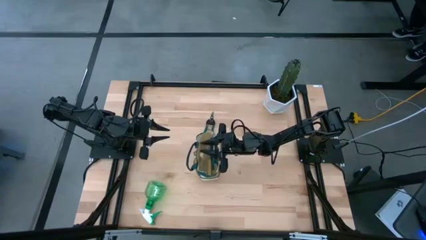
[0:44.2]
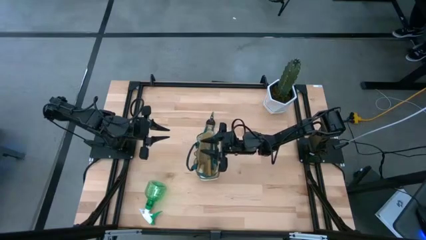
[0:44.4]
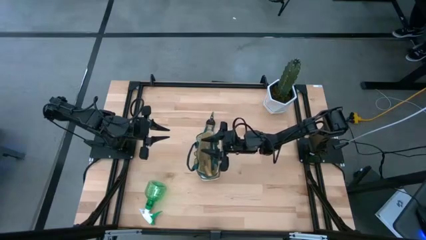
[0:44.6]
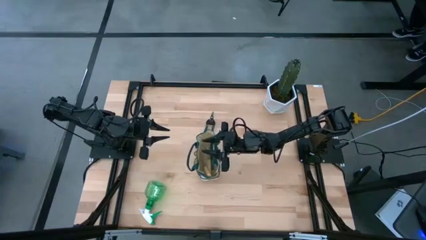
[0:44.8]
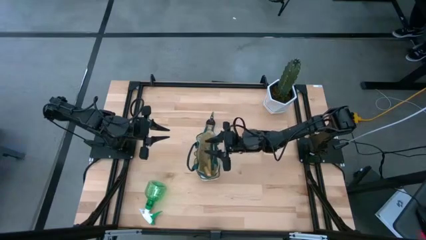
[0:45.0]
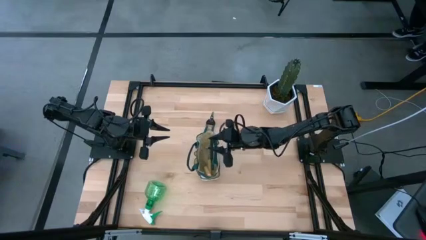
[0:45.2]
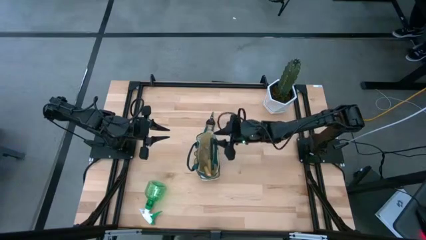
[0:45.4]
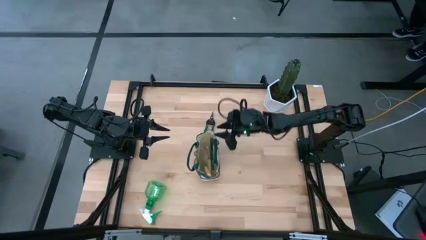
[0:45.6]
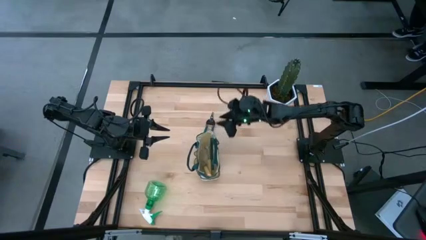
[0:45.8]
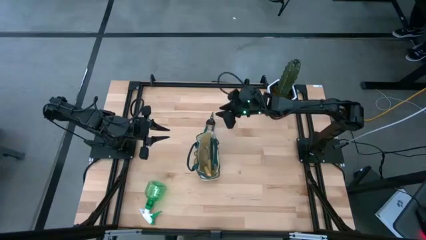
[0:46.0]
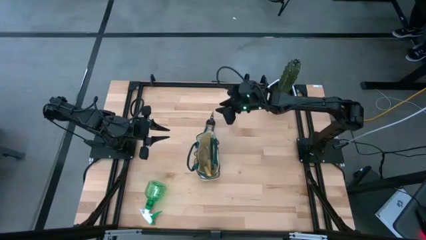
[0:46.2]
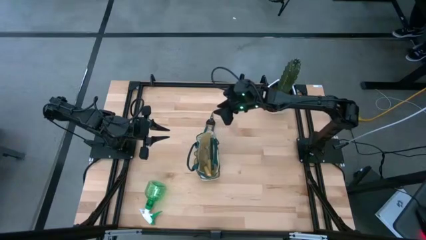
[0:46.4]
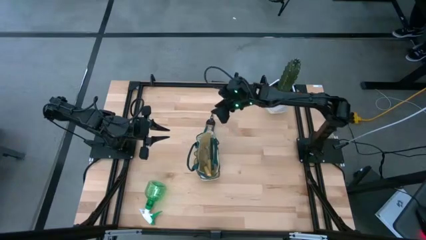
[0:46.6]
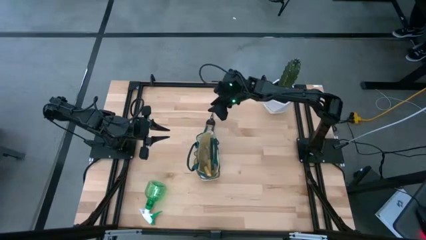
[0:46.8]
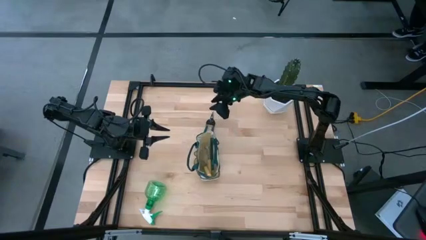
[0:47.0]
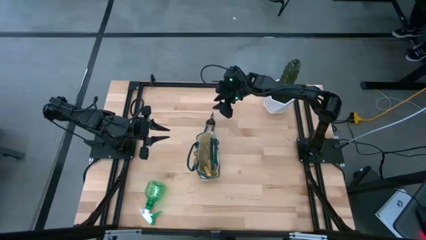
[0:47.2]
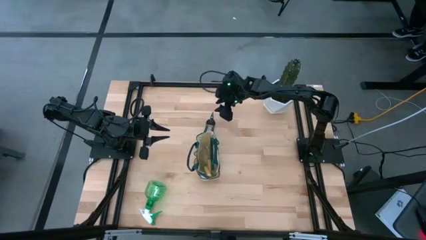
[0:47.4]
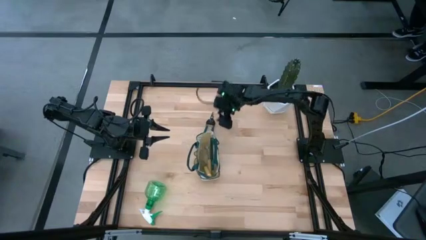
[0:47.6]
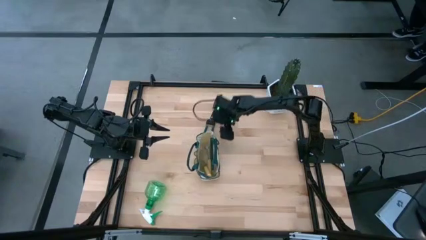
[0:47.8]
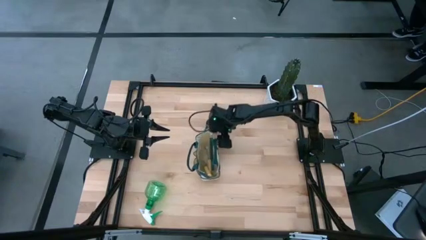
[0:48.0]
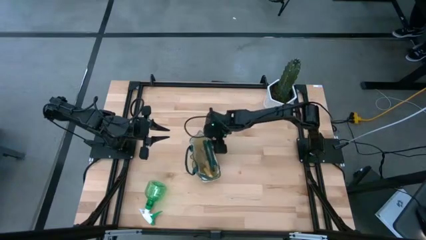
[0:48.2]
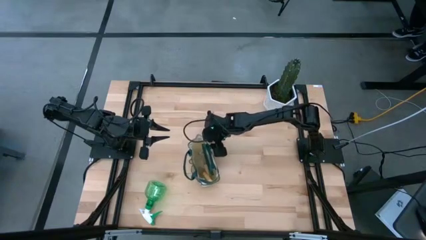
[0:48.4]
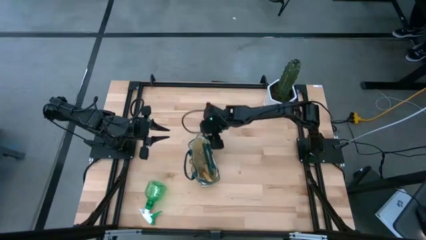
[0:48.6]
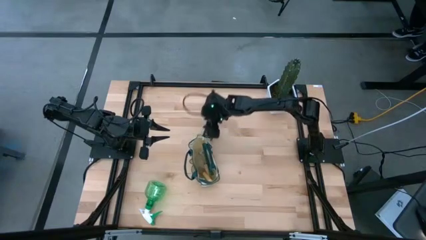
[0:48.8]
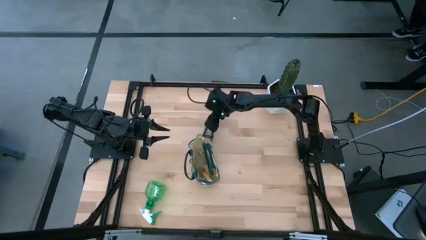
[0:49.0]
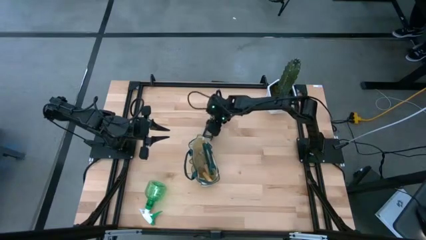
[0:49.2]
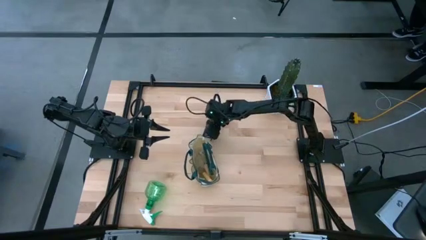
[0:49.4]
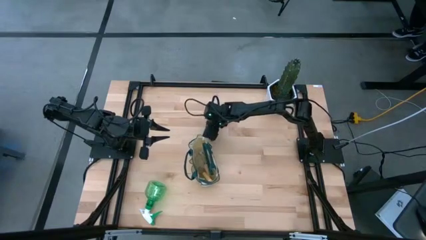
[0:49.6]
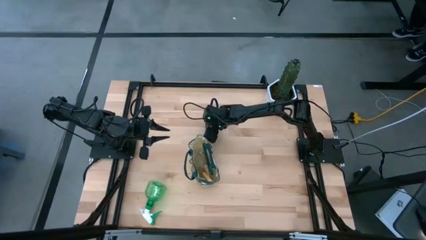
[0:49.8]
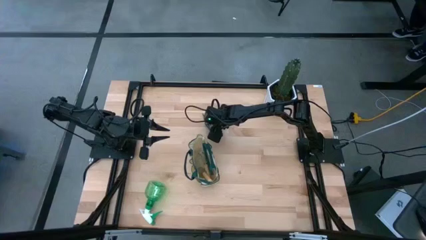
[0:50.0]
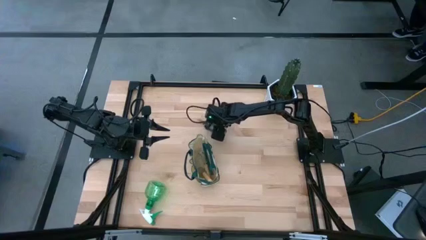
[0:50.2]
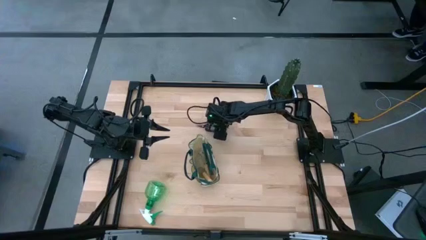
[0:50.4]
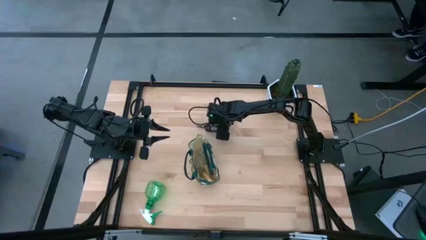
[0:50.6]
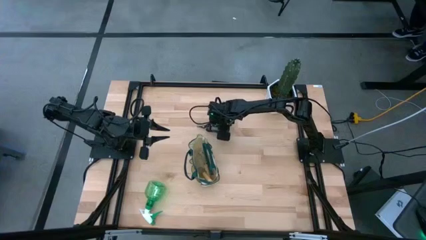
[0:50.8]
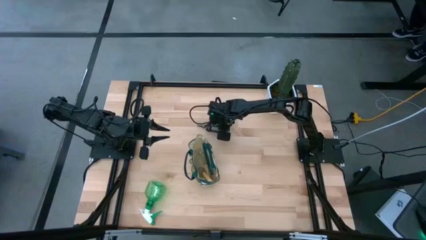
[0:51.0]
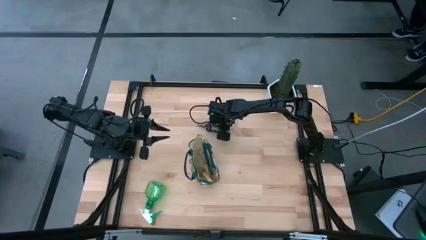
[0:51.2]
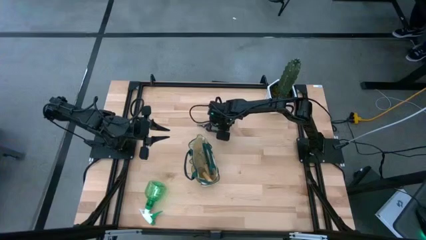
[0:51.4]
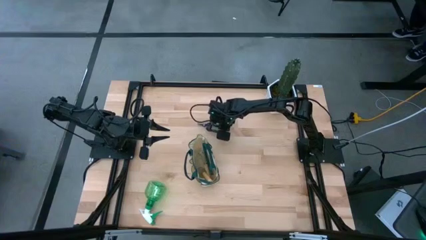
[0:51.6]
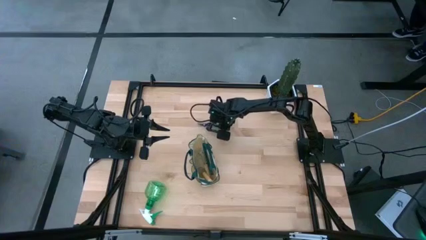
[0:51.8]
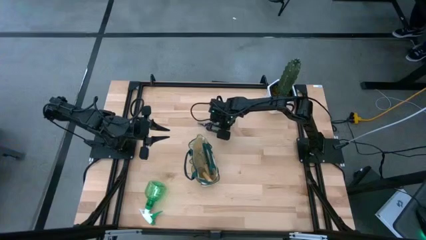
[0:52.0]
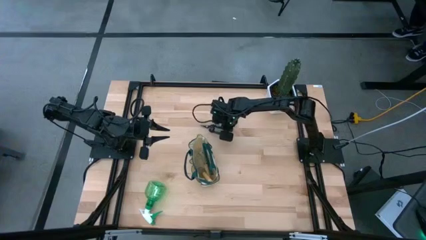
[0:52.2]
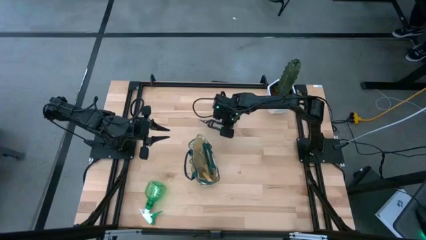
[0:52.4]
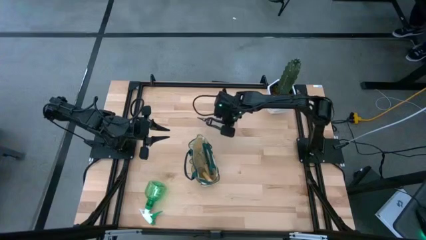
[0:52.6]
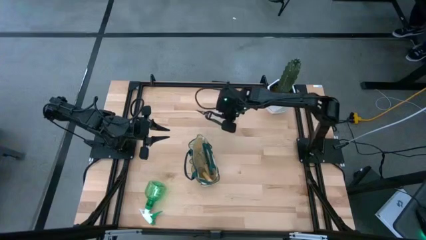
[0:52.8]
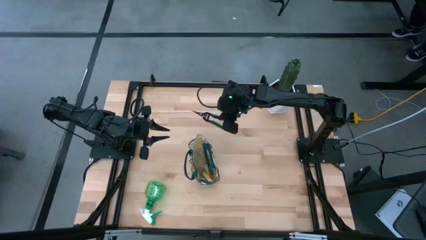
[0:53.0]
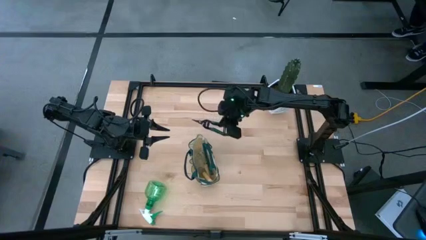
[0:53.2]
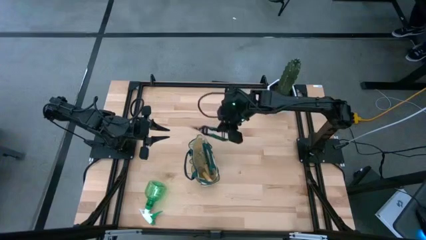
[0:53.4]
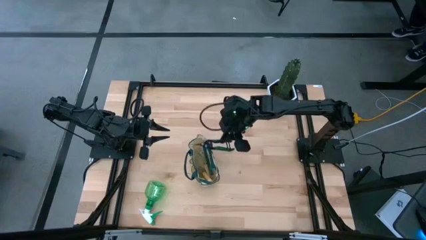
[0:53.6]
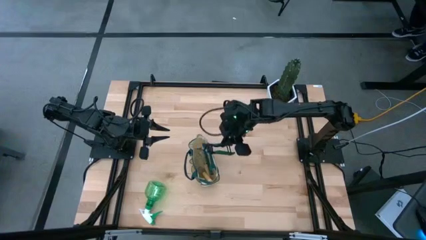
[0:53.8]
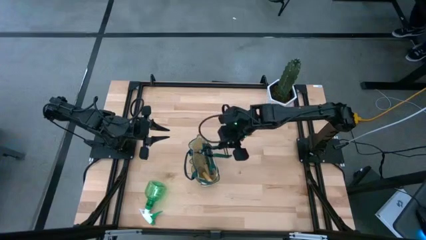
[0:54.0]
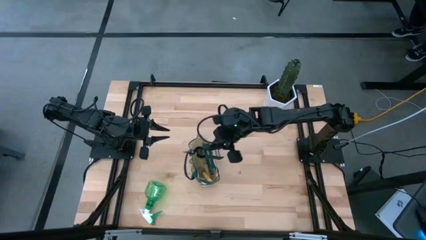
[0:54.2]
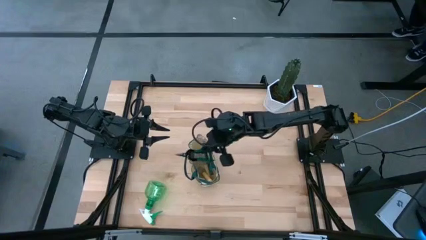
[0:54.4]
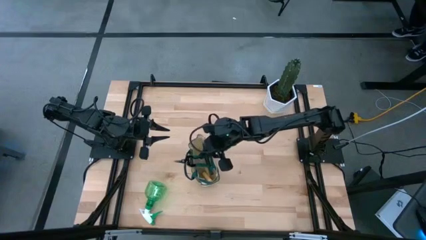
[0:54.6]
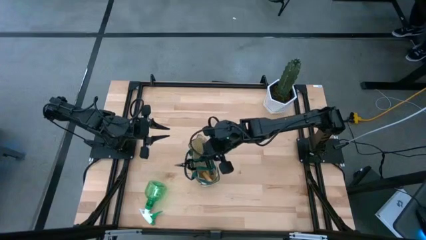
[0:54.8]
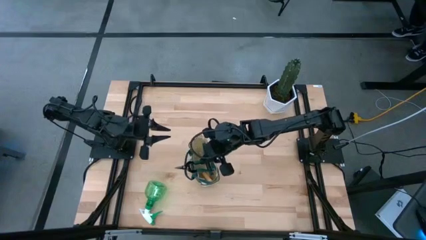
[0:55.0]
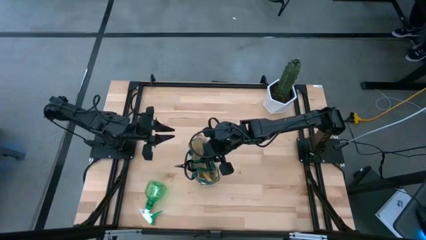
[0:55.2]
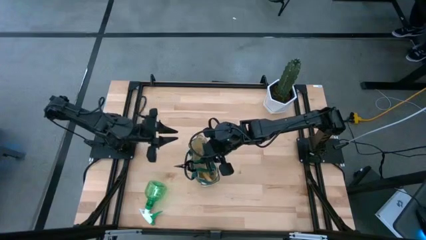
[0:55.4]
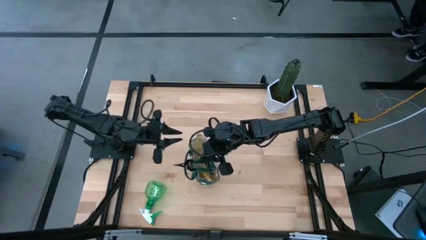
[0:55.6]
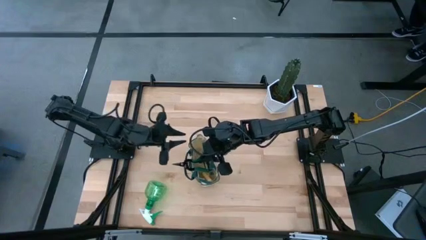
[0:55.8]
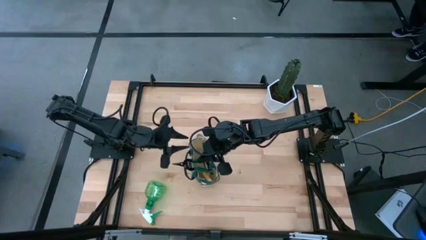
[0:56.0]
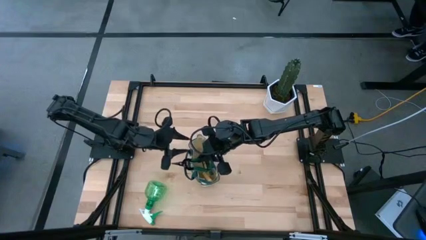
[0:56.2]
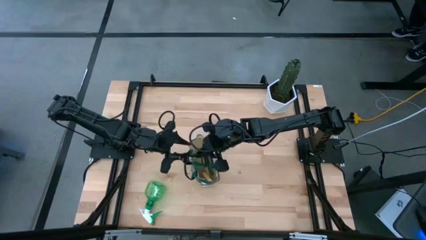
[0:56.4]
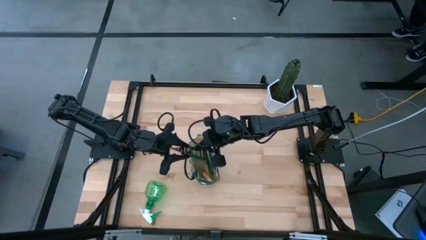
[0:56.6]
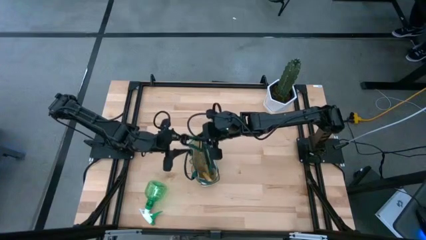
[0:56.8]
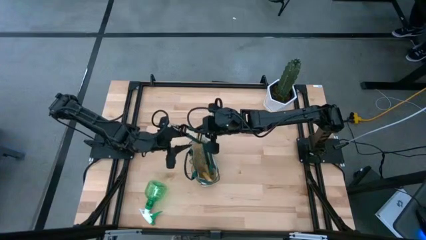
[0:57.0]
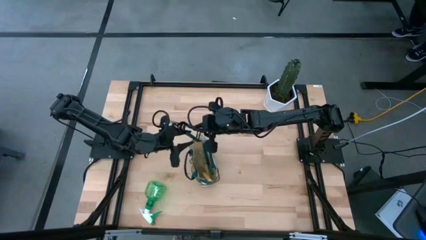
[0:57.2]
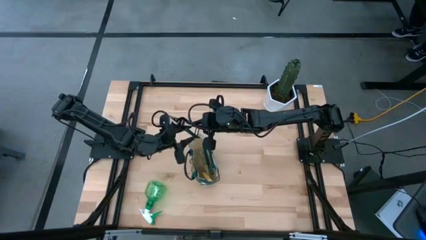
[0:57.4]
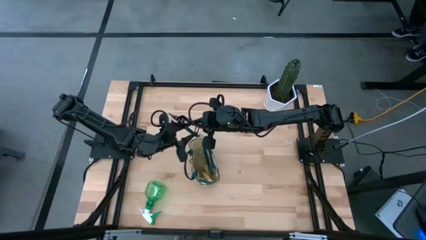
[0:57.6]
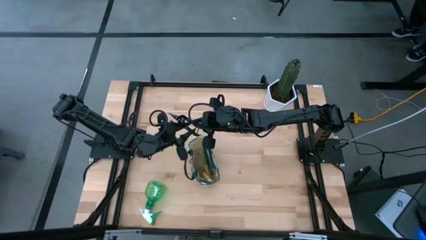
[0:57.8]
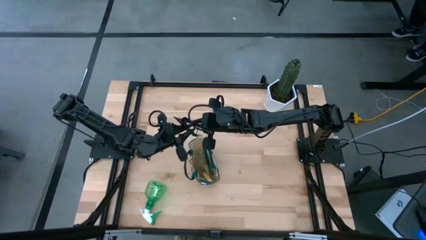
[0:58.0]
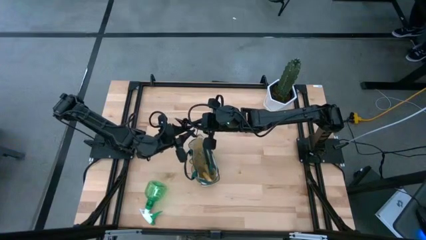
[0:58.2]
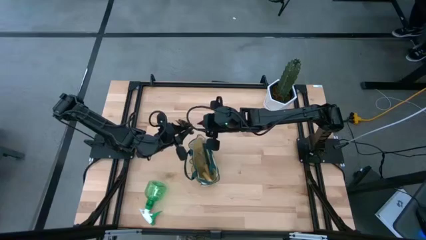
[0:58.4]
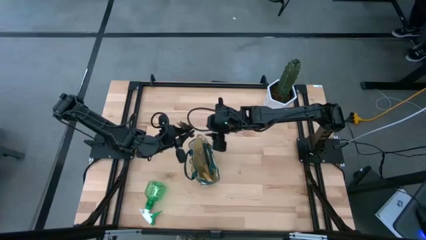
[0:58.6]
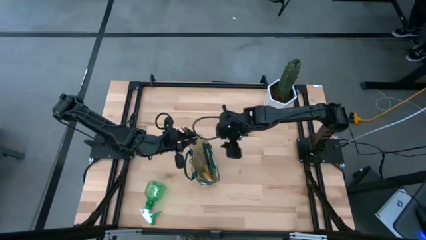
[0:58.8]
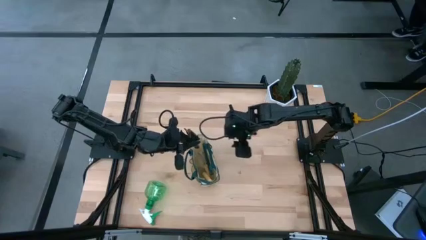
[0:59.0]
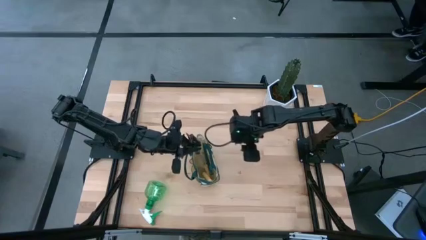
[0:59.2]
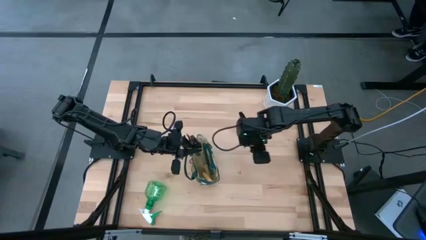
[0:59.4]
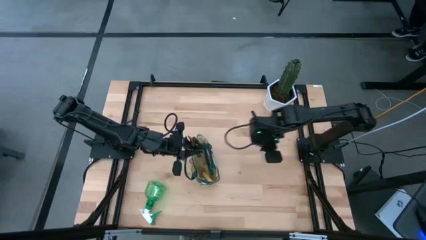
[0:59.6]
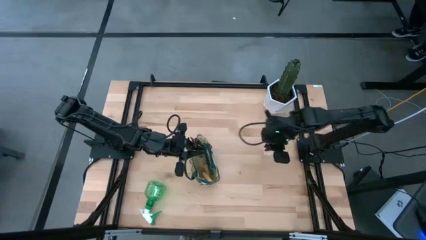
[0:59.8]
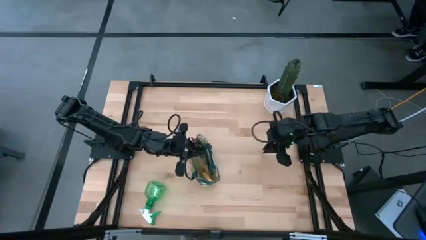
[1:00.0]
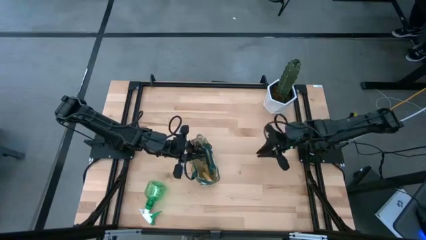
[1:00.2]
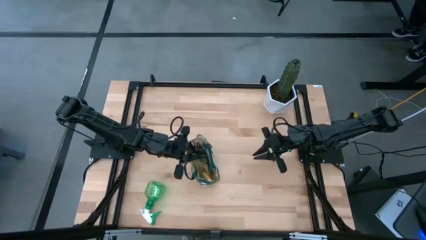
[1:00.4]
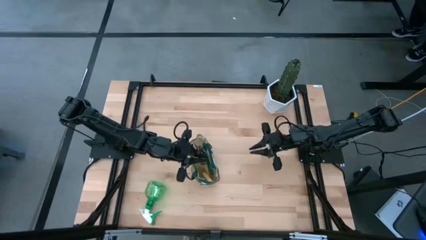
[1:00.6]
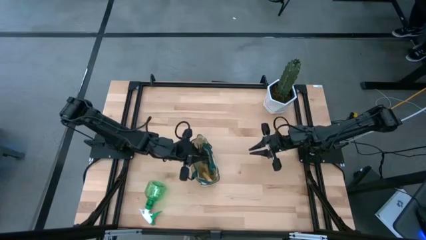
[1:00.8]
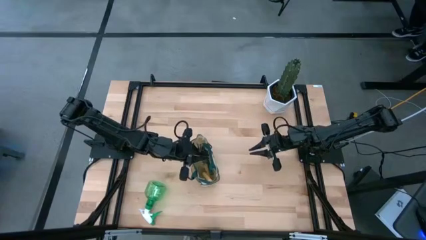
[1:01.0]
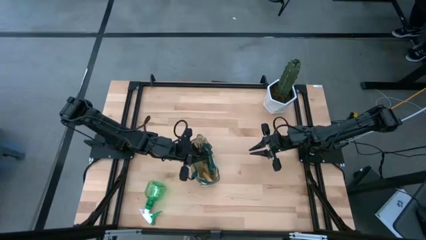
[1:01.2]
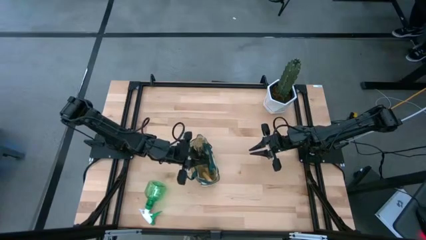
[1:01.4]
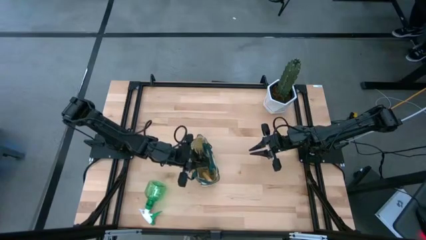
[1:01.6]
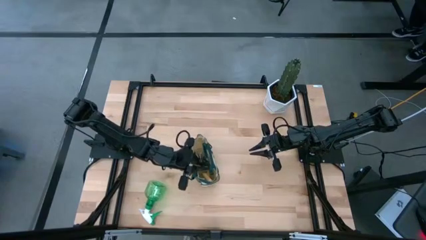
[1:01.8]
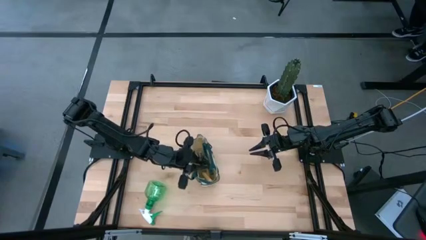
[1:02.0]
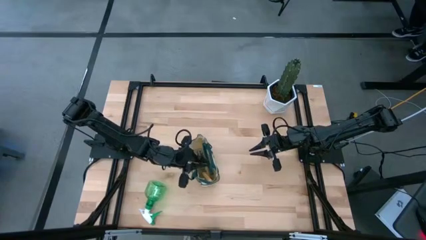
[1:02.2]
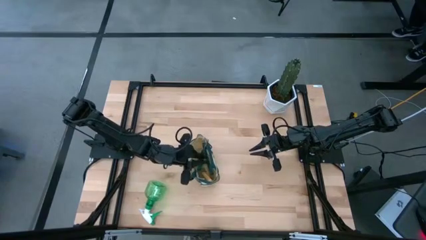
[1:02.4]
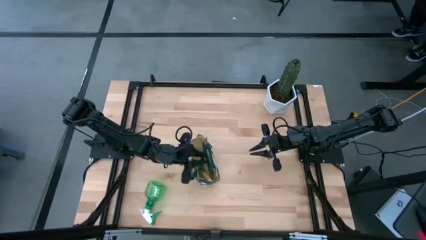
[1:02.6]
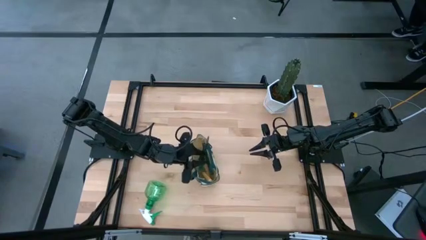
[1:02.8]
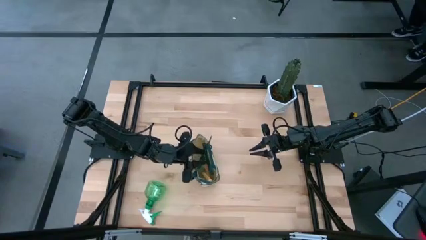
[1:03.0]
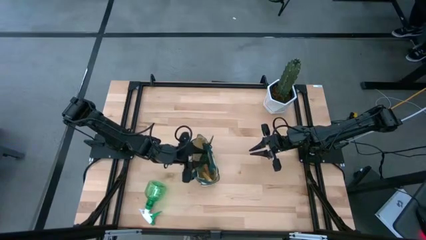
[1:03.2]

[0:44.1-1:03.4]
Task: Pick & Place Garden tools in Gardening bag
Put the green shear scissors into the gardening bag
